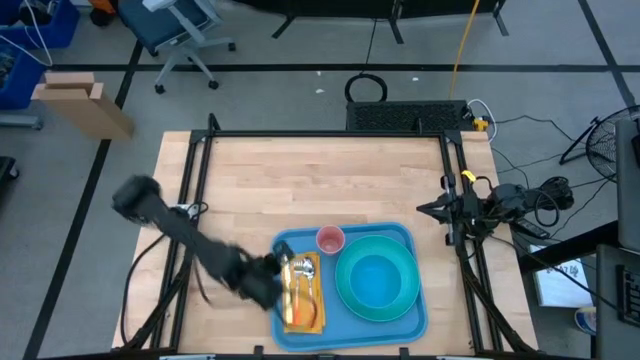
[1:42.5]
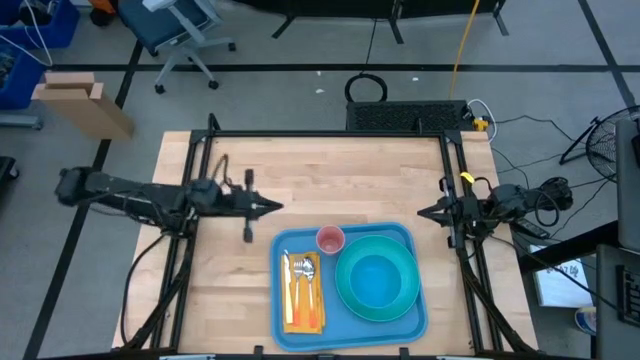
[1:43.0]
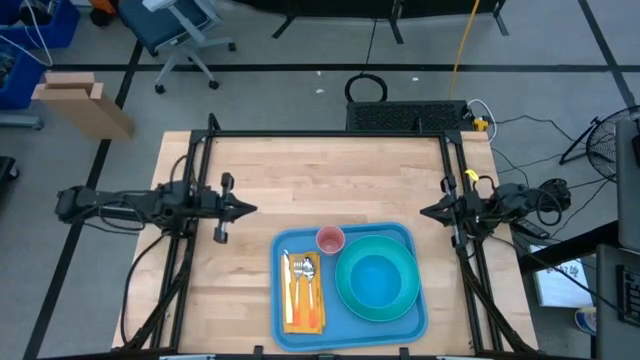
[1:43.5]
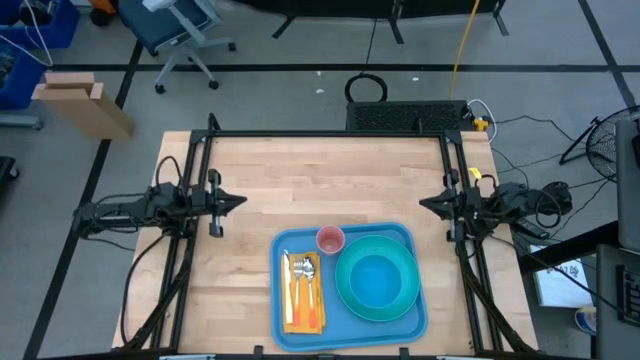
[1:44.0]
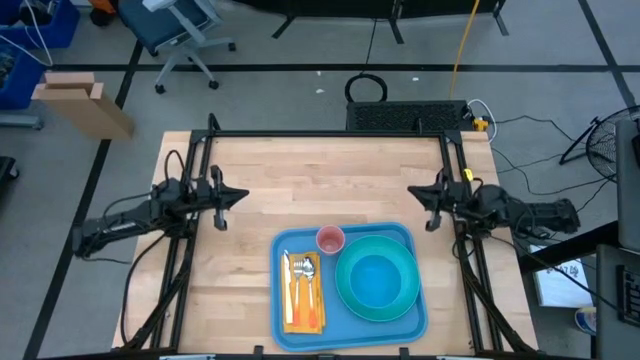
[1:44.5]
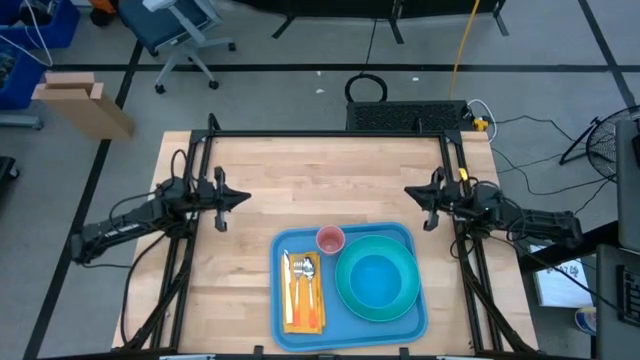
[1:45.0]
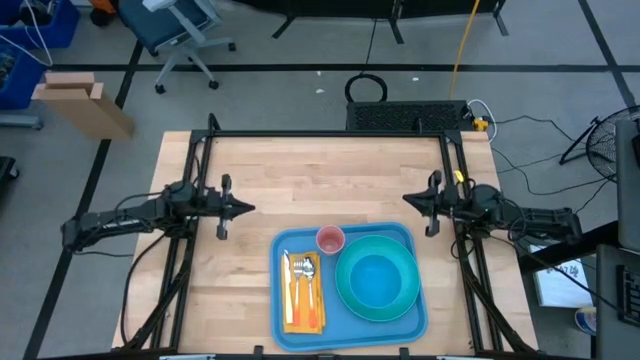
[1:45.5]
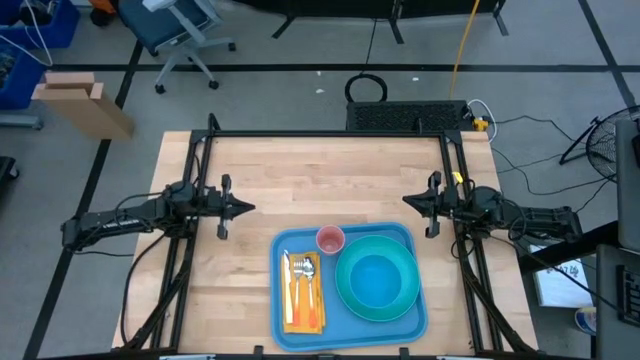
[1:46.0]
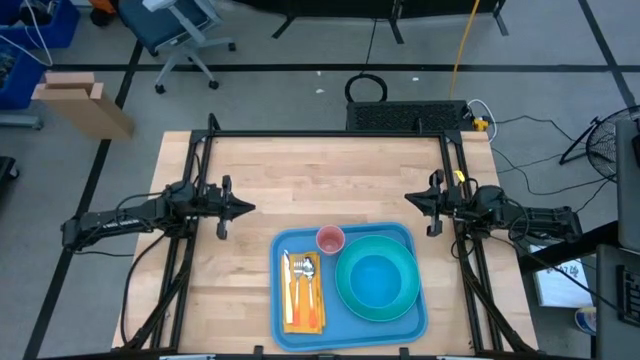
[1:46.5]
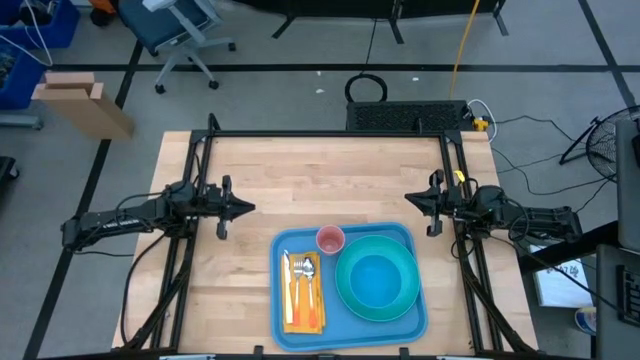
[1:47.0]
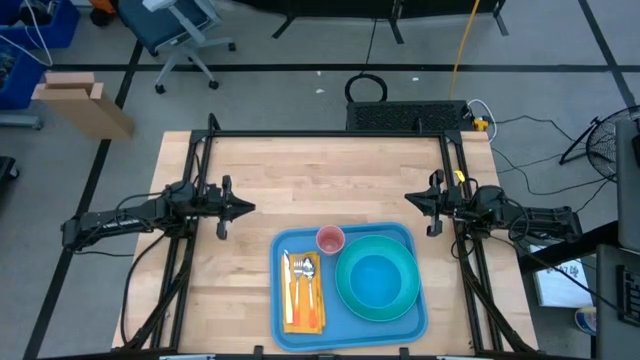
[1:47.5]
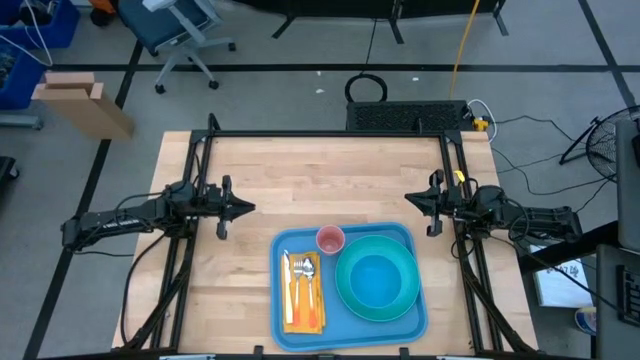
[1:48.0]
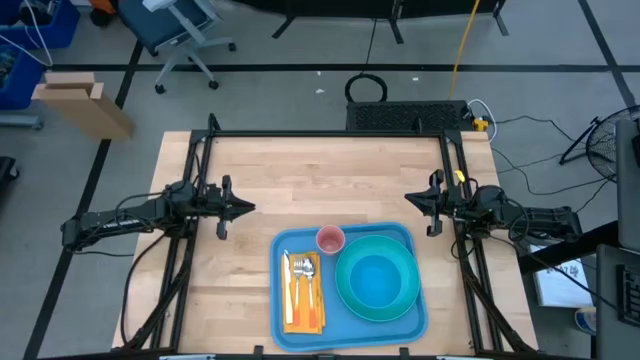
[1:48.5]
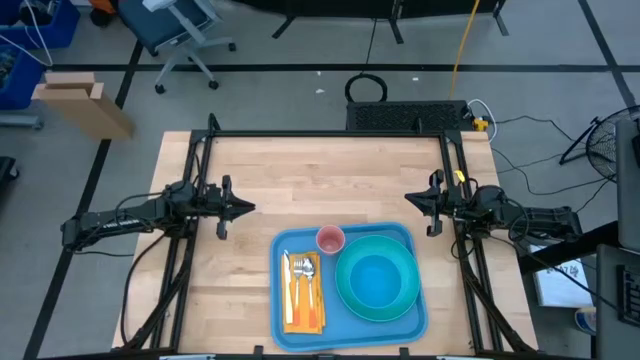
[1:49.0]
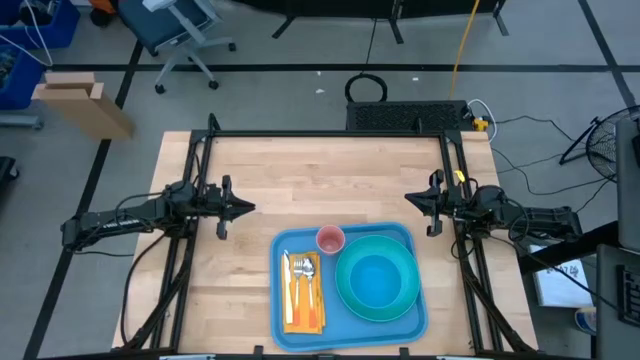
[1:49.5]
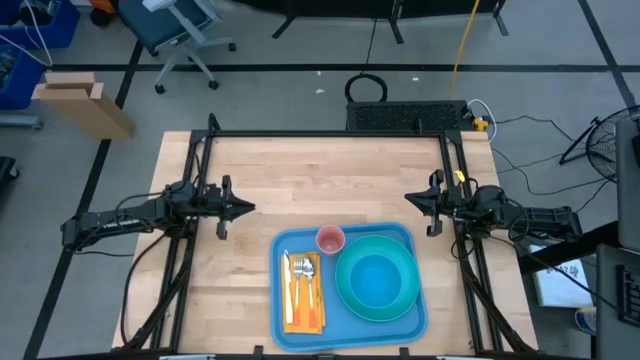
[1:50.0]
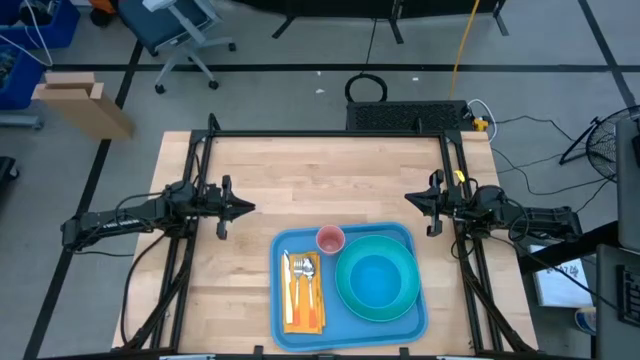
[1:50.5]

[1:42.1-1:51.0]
Task: Set up tray
Return to Home Position

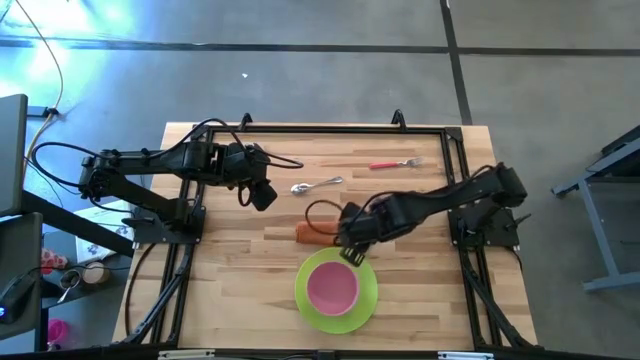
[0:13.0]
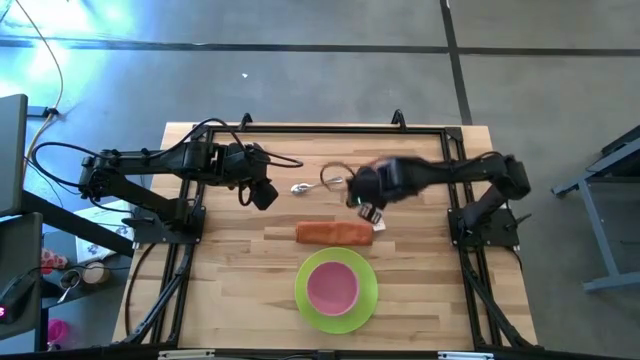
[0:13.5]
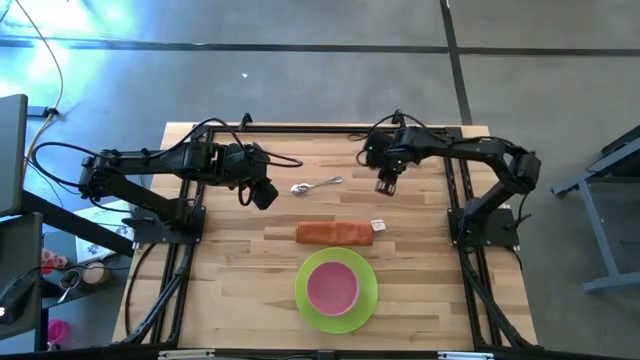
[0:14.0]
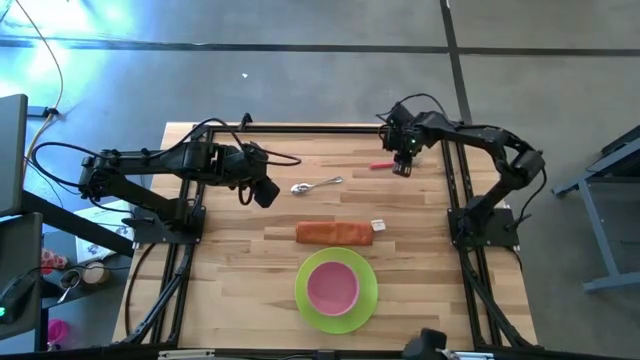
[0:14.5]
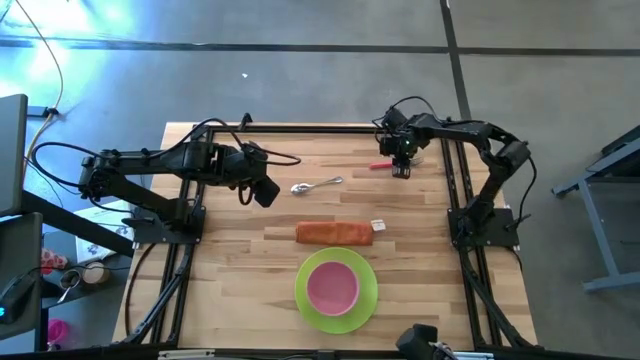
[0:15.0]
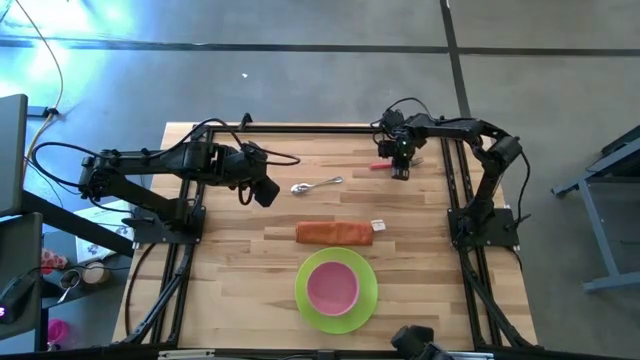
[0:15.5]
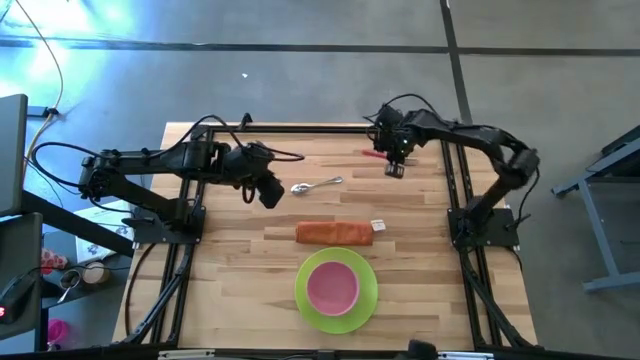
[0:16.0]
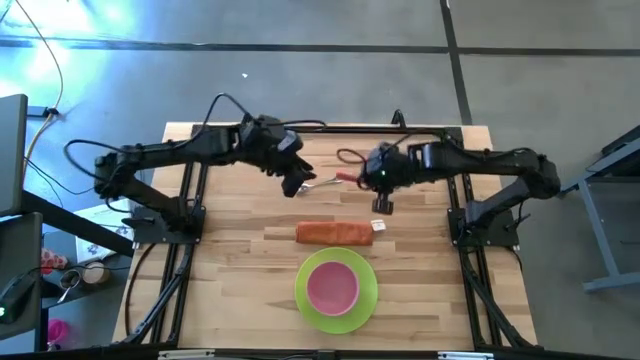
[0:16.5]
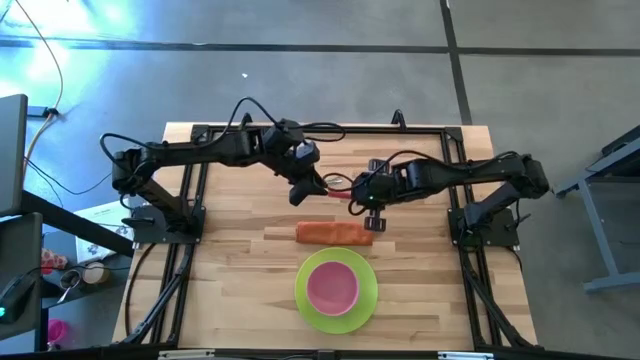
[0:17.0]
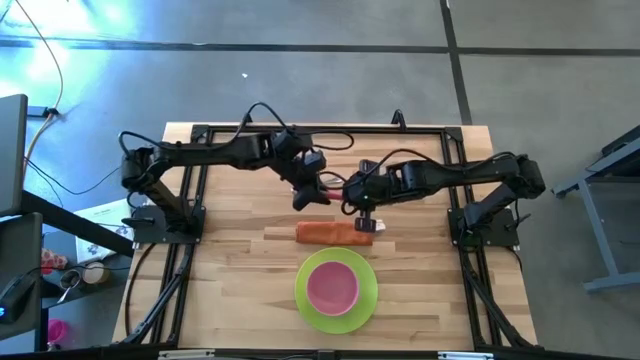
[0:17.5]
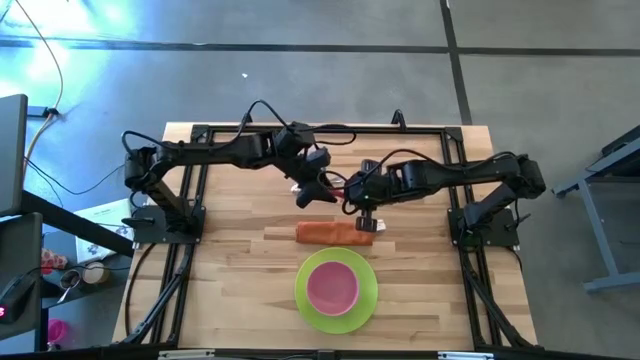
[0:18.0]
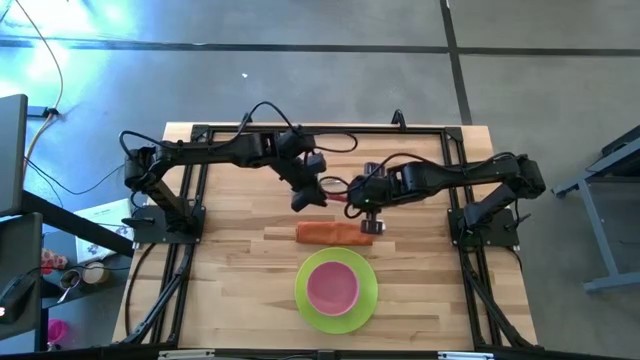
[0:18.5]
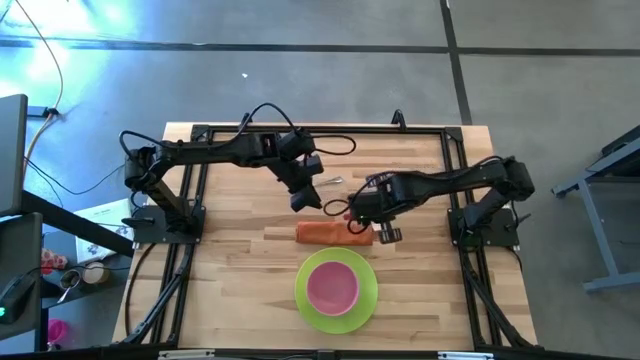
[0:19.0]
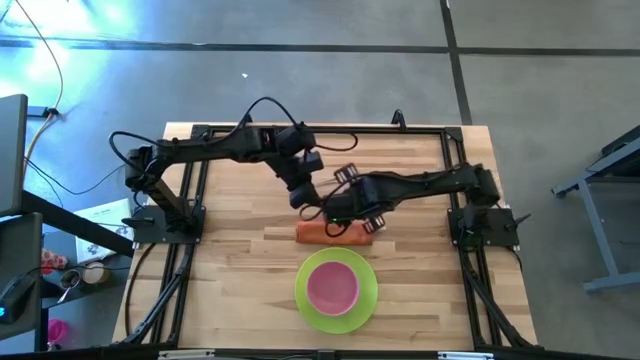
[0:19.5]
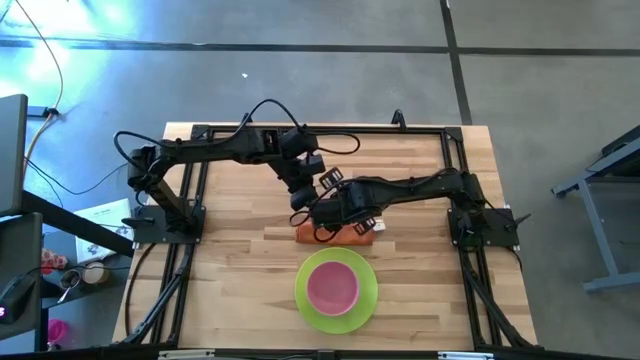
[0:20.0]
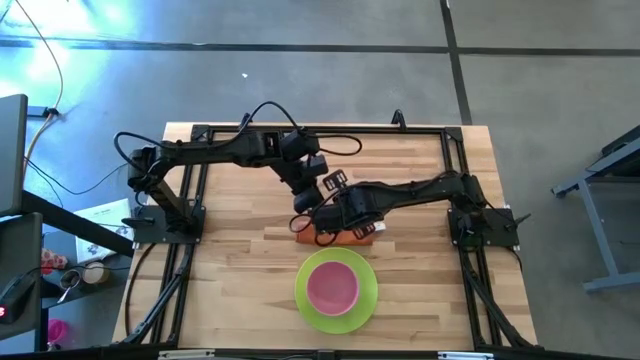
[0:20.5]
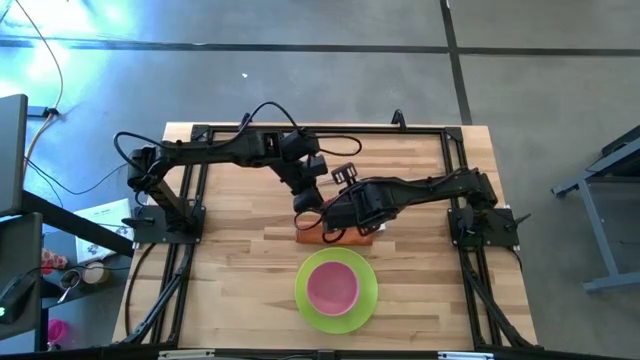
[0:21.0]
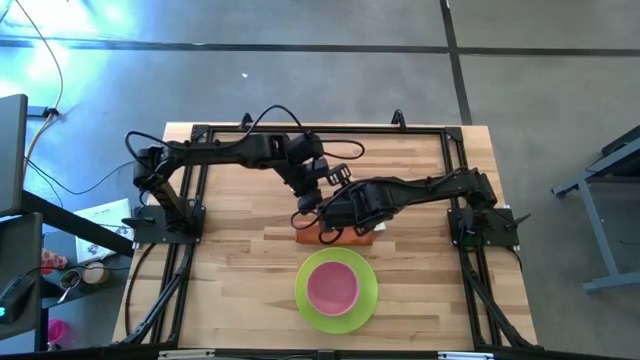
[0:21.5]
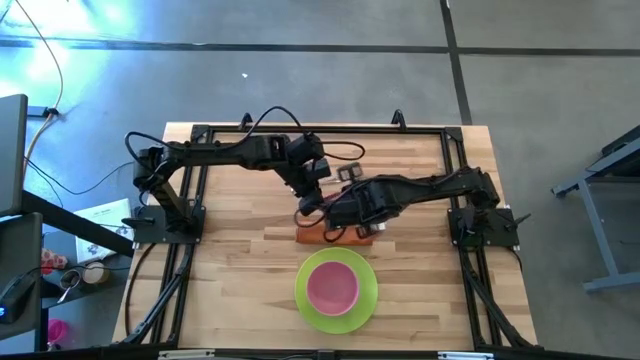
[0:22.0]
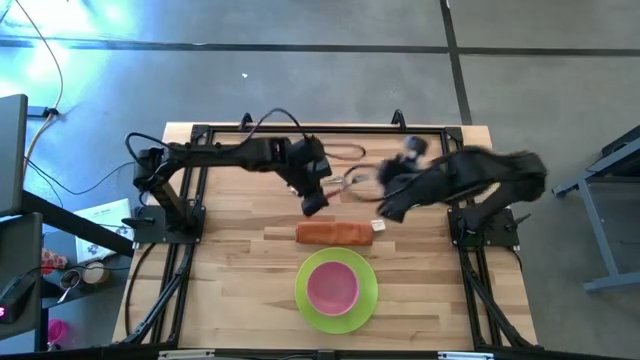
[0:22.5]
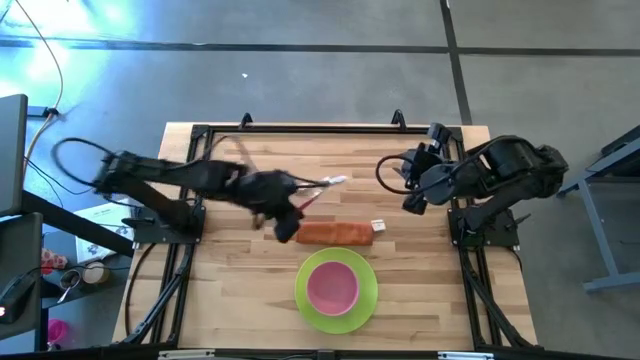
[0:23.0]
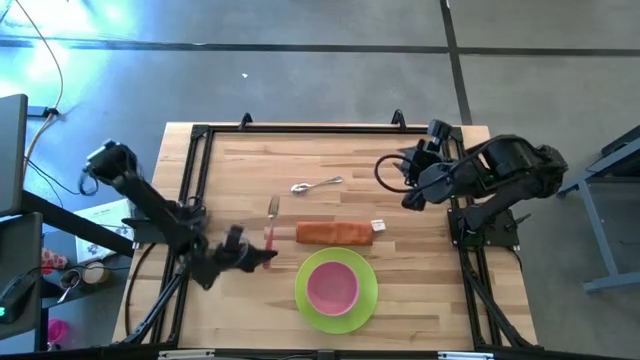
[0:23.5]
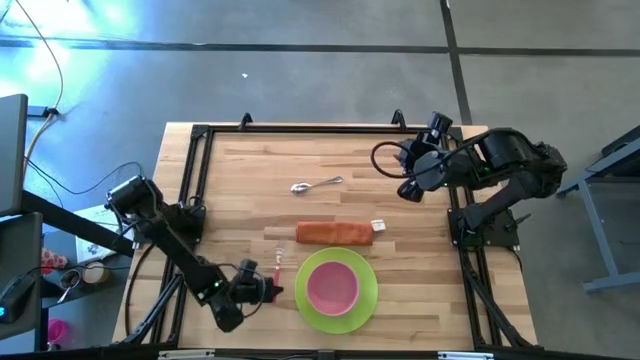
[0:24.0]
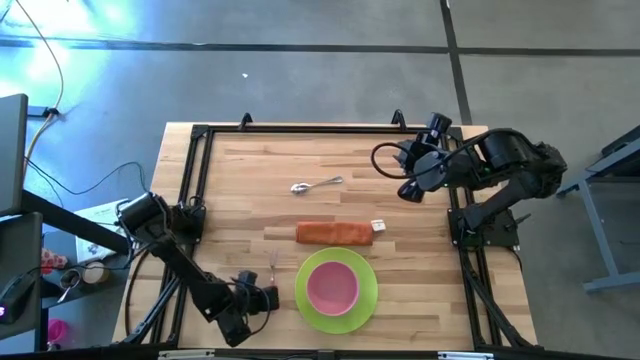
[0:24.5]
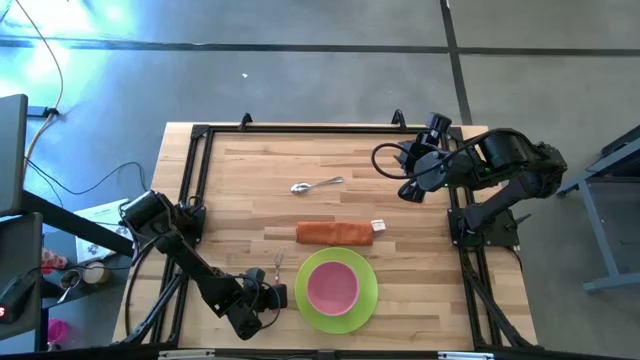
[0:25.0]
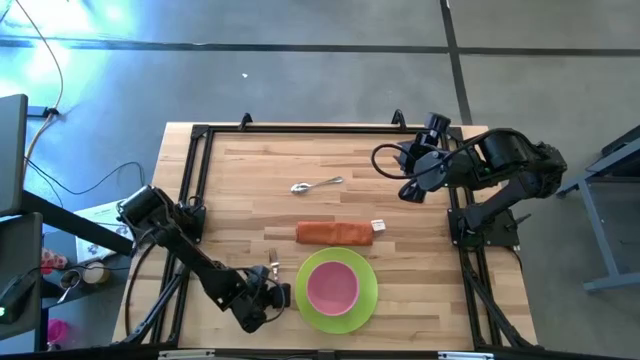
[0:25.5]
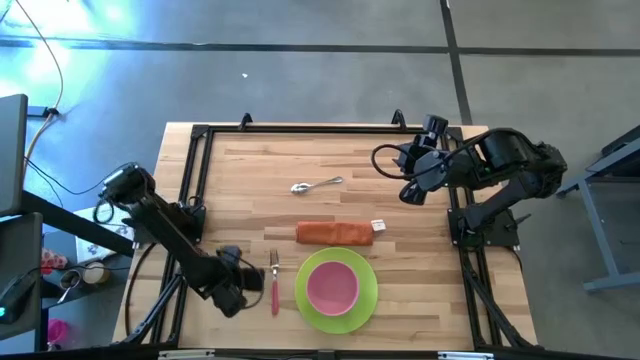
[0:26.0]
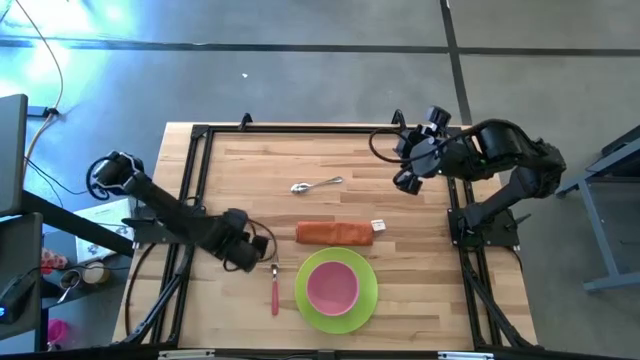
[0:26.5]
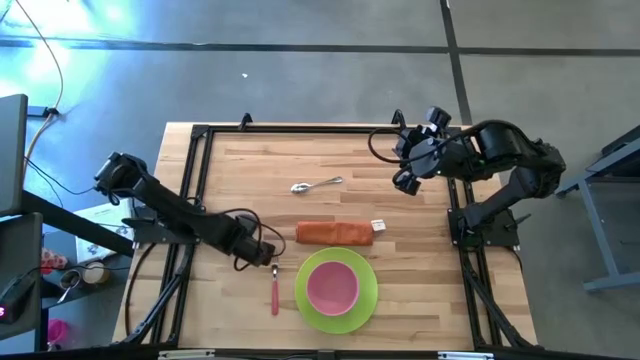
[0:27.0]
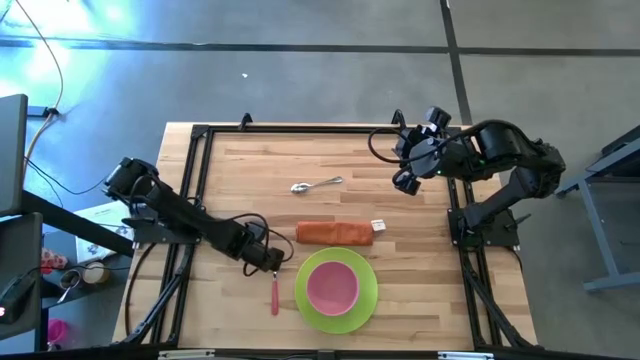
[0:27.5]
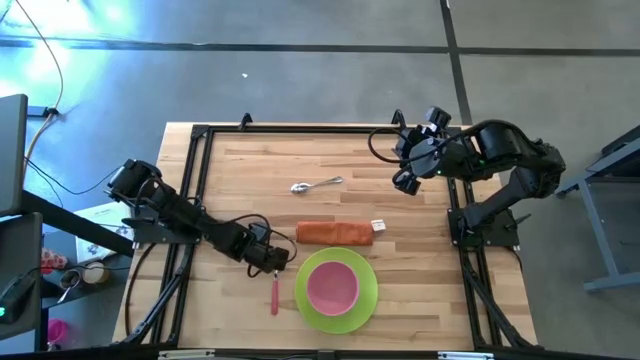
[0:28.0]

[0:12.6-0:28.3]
Task: Set table place
Put the pink fork to the left of the green plate
